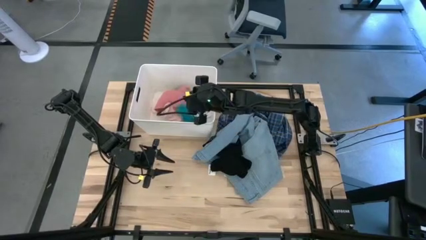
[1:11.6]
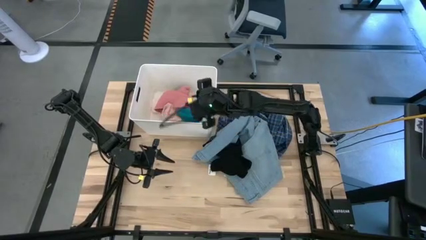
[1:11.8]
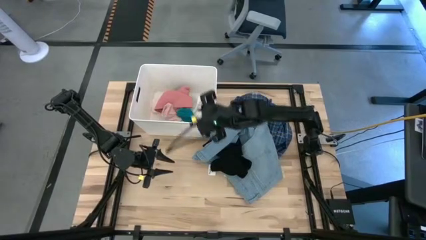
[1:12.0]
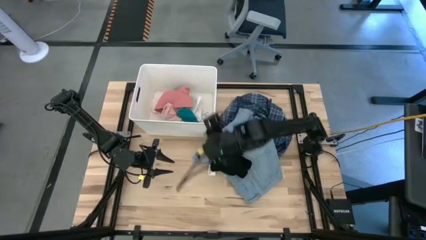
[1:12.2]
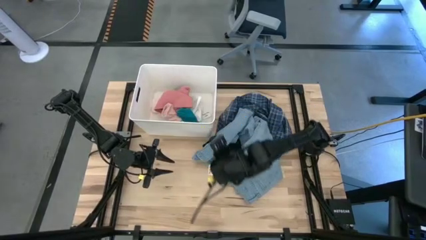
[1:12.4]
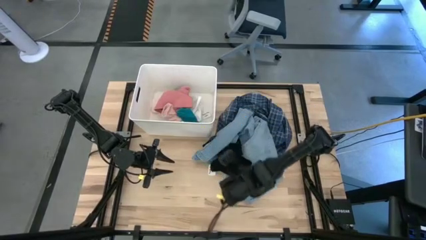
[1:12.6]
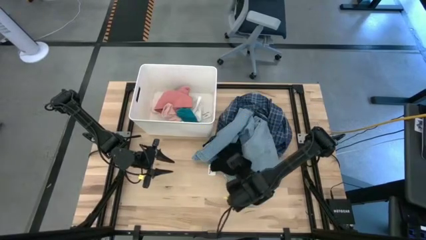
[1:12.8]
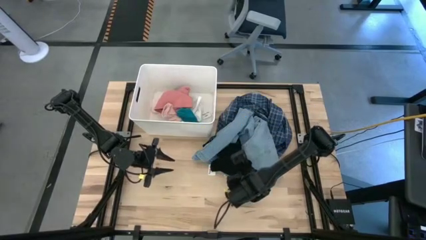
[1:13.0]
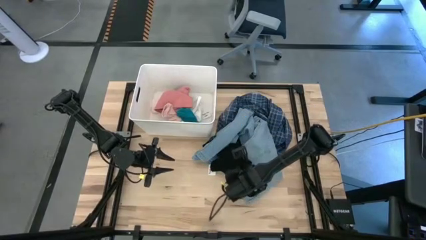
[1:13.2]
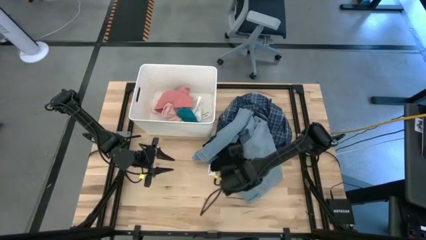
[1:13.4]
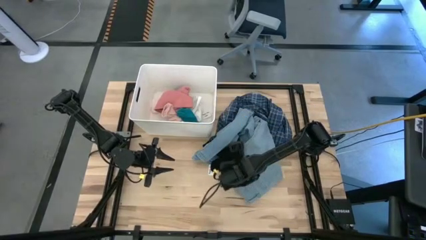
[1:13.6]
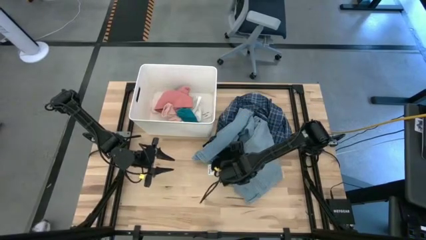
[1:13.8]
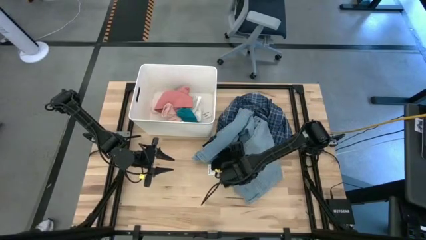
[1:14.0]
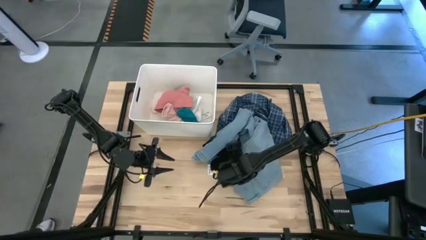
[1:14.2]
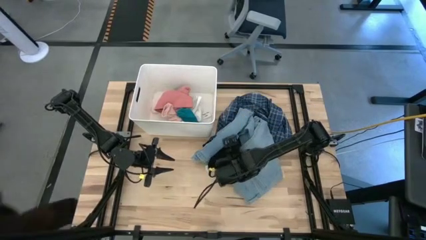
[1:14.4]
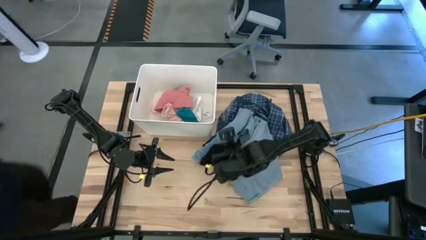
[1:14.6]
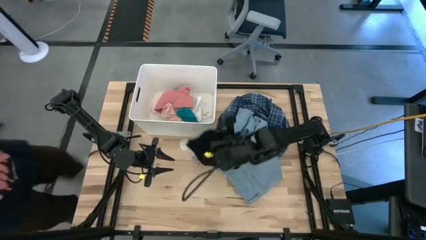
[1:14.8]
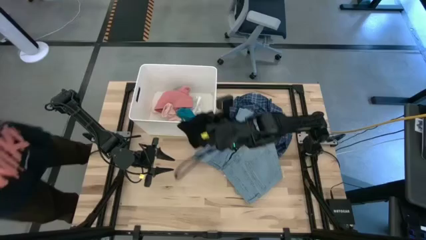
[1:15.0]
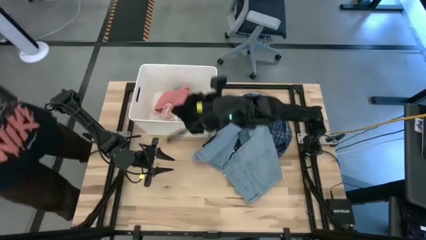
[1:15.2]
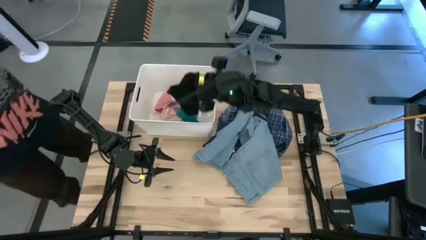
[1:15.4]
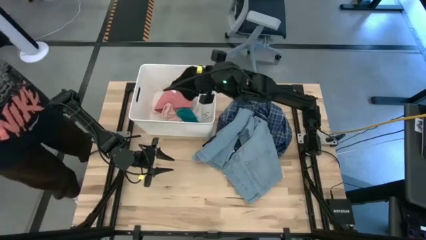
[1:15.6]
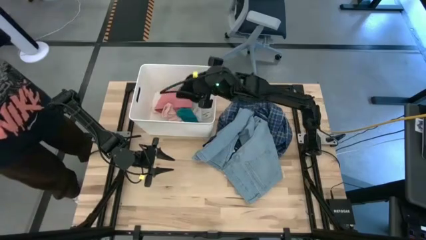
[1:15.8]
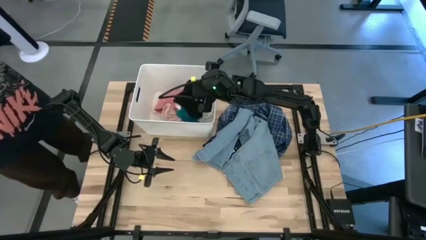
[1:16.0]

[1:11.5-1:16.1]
Task: Sort clothes
Put the black underwear into the white laundry bin

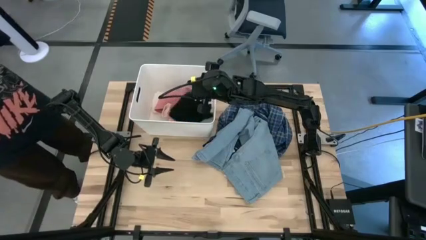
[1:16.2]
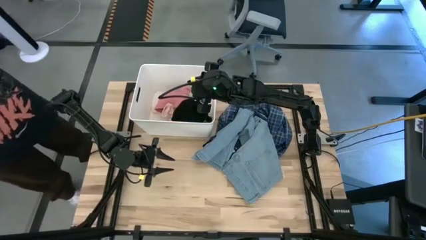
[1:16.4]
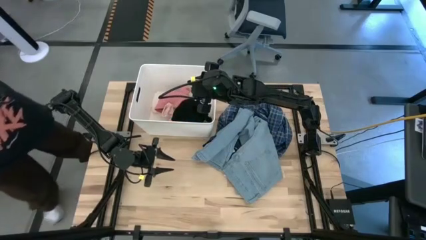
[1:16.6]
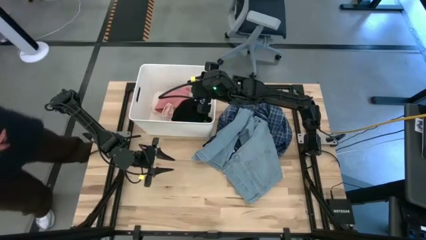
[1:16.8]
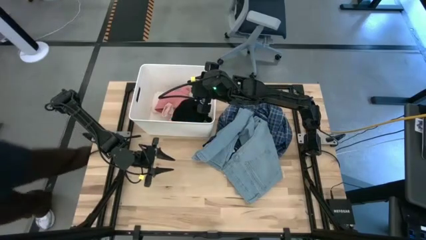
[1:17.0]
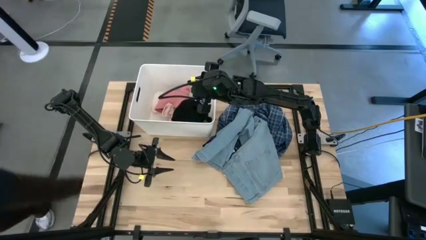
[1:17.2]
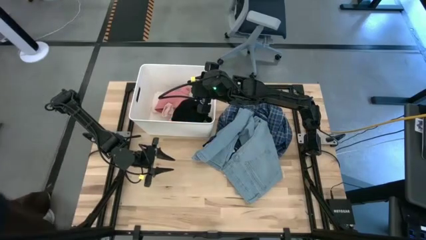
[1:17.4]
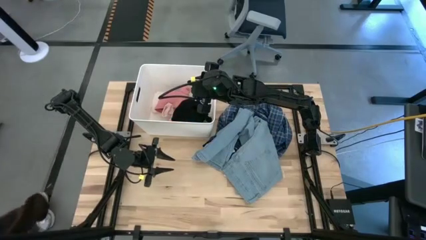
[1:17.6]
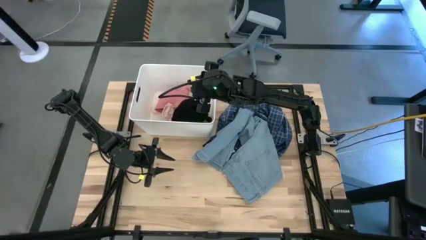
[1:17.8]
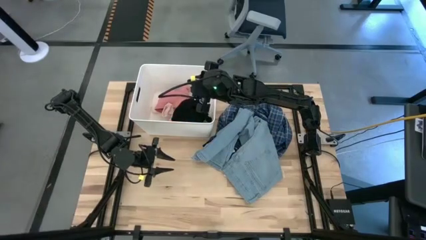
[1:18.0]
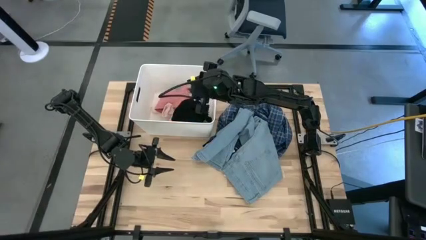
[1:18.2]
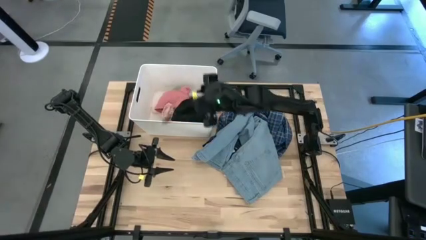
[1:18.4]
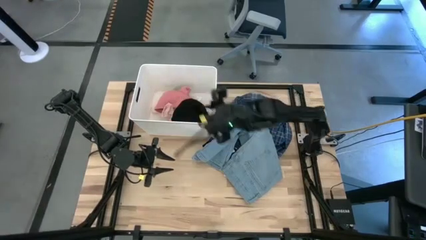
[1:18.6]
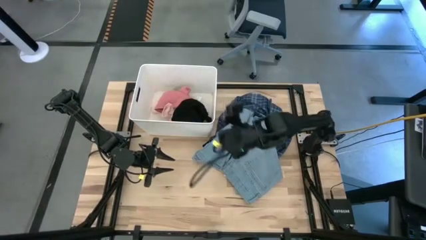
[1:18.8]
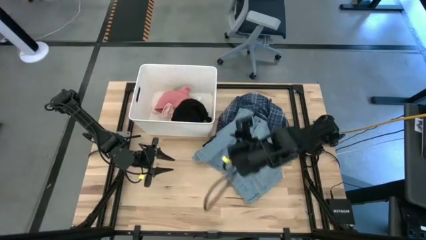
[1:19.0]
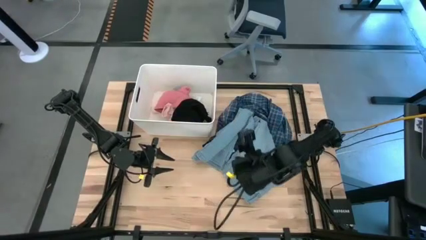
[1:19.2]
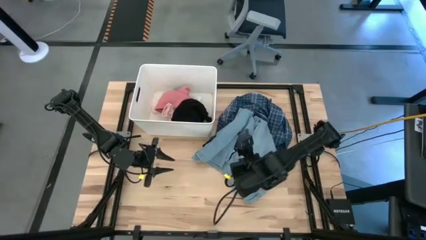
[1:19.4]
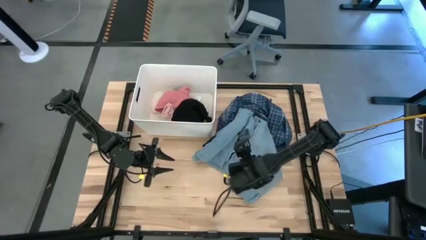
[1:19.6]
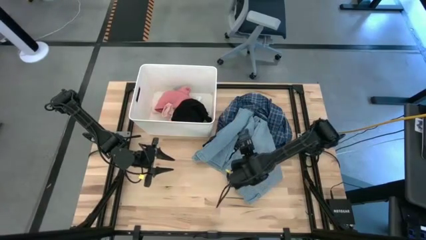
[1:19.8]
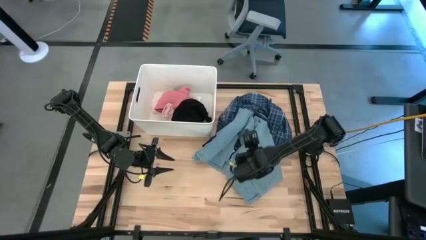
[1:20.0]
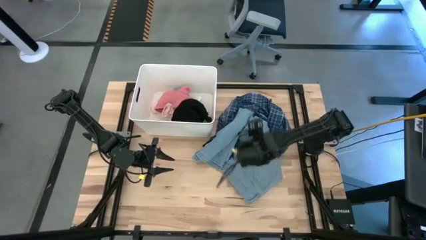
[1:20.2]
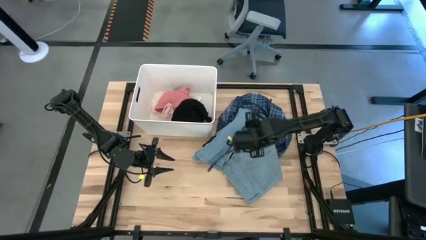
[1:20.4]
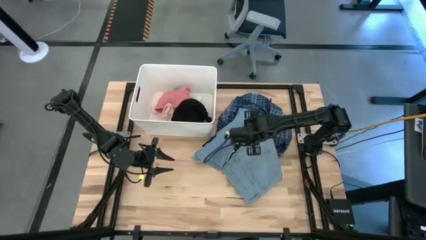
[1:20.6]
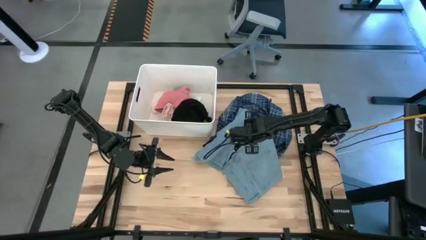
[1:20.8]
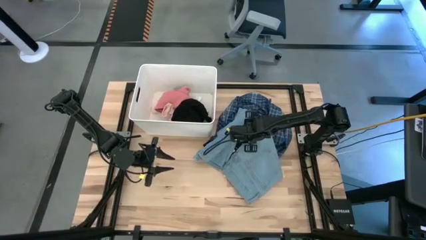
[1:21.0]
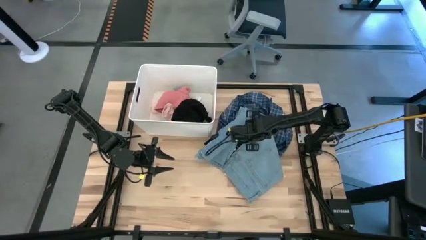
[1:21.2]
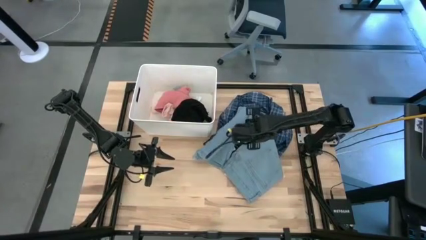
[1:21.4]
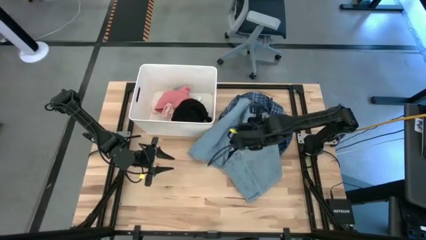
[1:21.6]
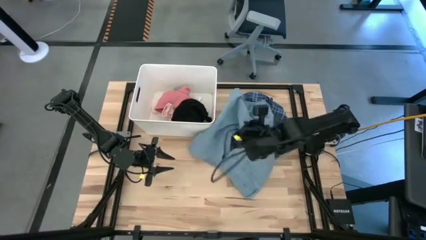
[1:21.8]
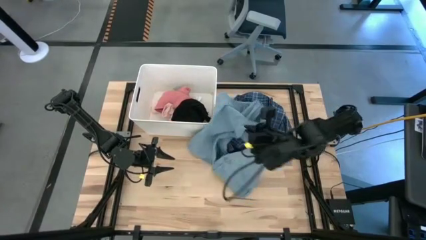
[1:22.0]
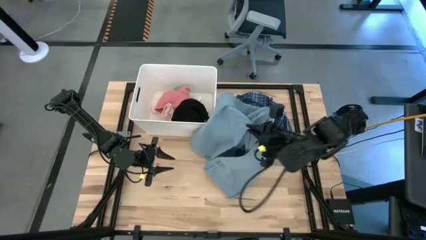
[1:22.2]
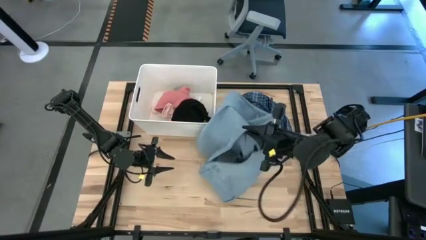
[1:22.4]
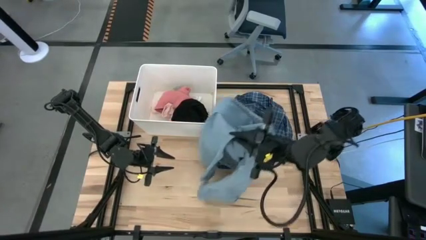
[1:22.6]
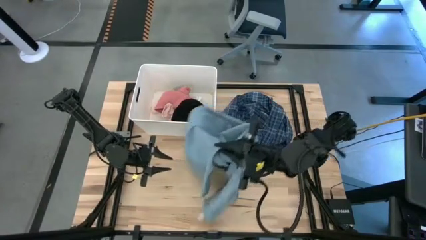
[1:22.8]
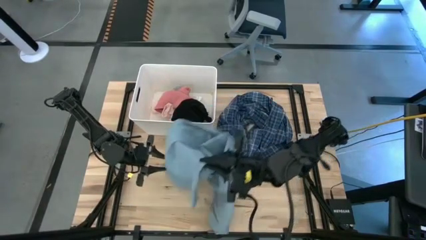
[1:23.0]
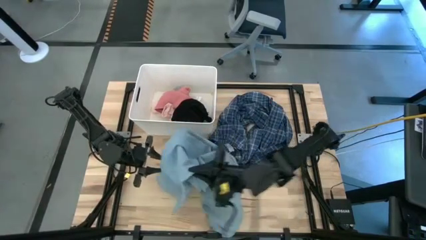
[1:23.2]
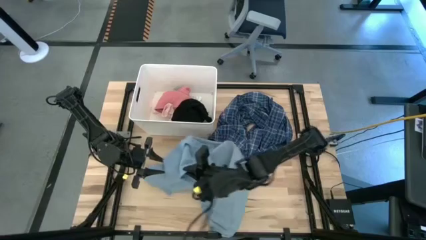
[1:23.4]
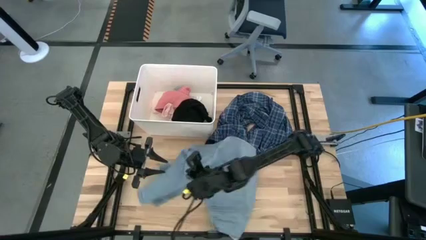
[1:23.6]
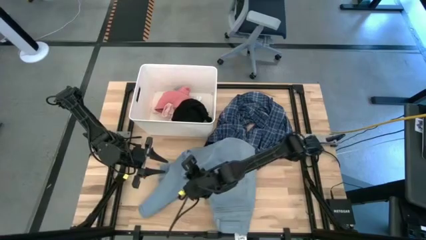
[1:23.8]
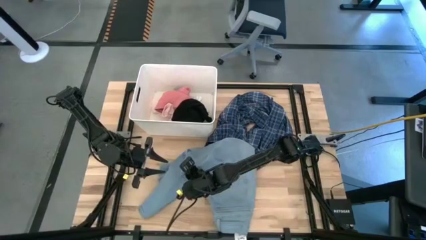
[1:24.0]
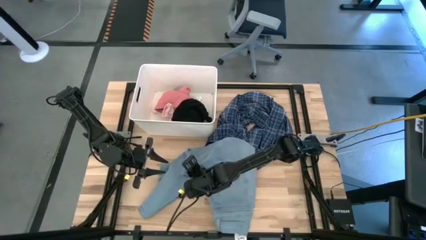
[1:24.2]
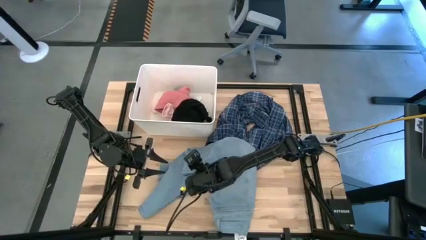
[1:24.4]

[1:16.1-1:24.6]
Move the blue jeans to the center of the table

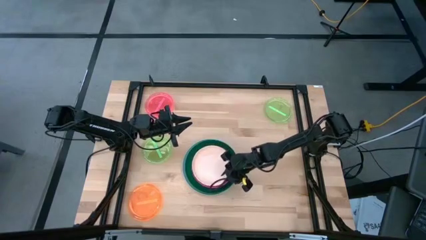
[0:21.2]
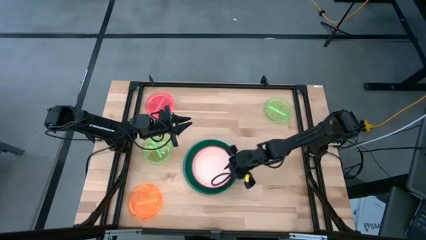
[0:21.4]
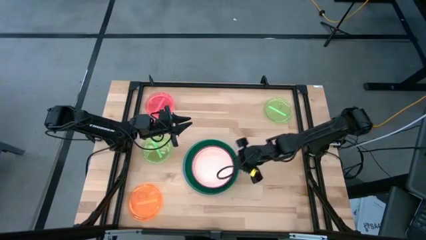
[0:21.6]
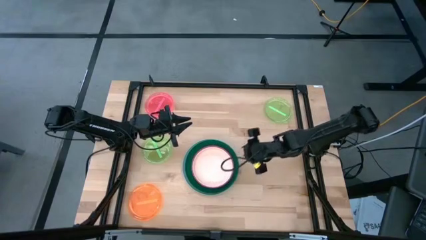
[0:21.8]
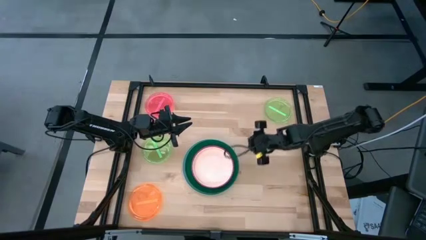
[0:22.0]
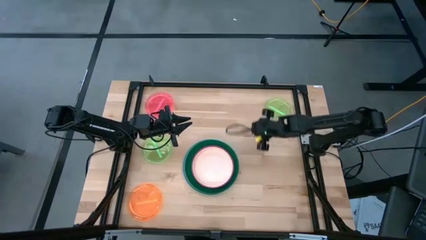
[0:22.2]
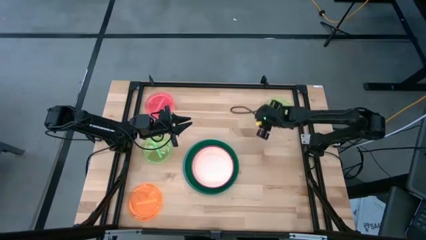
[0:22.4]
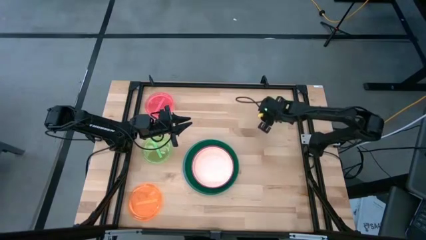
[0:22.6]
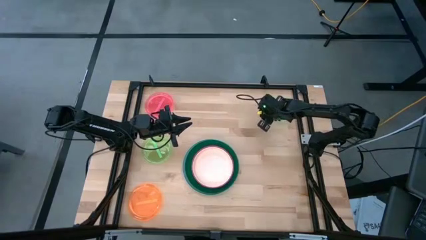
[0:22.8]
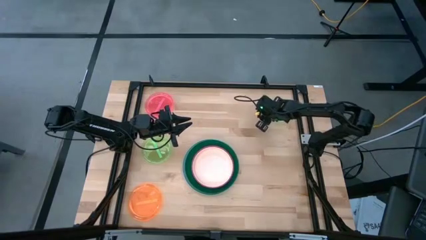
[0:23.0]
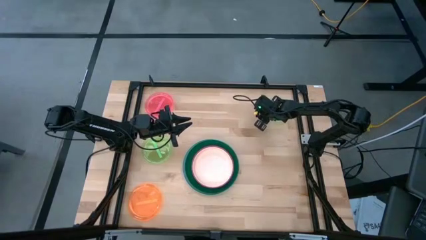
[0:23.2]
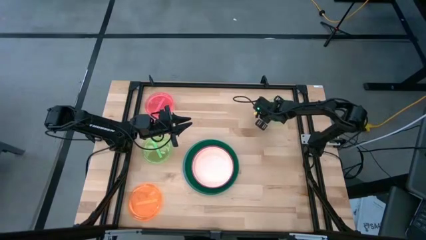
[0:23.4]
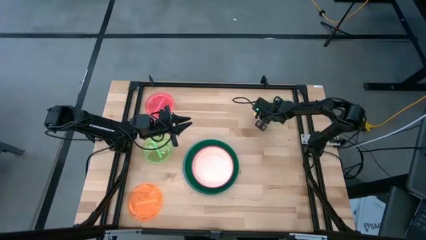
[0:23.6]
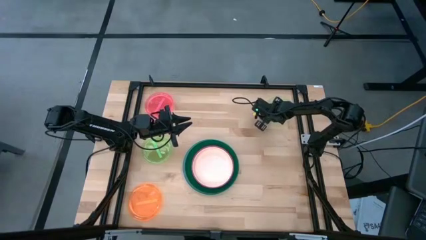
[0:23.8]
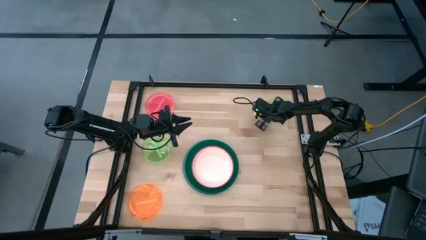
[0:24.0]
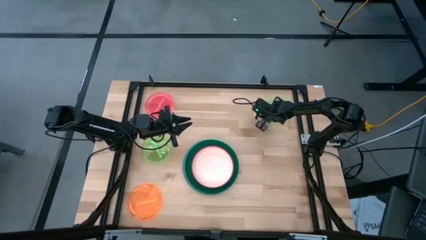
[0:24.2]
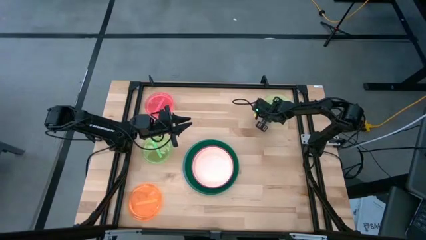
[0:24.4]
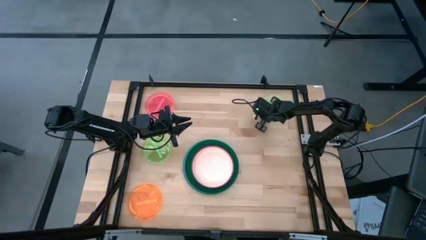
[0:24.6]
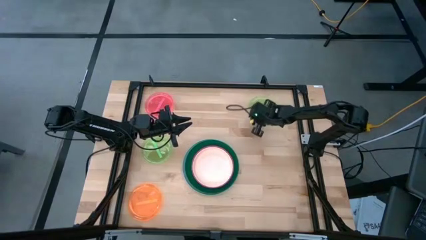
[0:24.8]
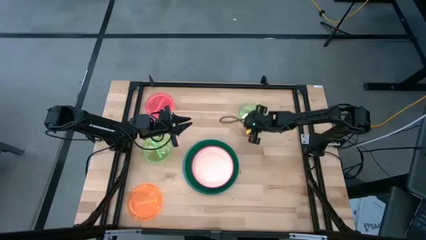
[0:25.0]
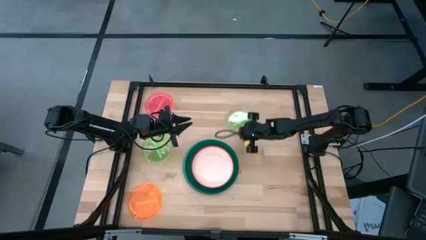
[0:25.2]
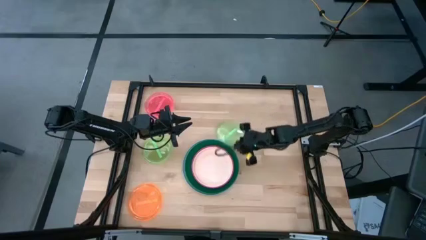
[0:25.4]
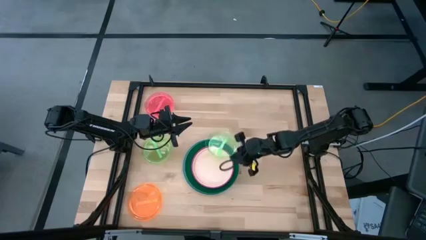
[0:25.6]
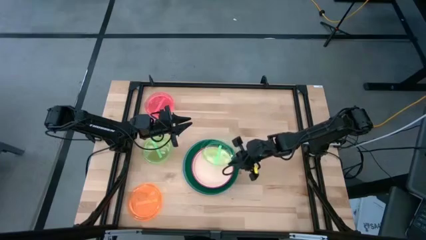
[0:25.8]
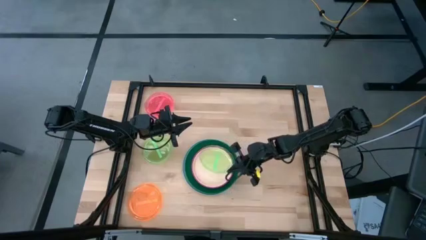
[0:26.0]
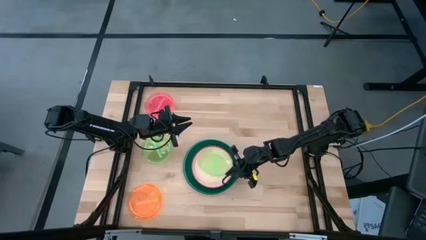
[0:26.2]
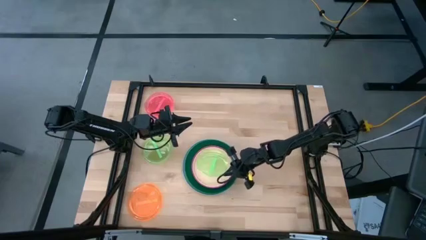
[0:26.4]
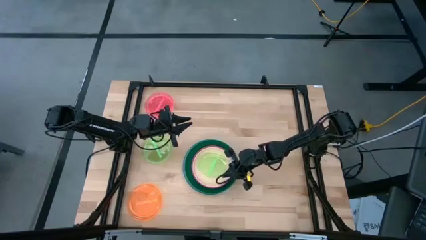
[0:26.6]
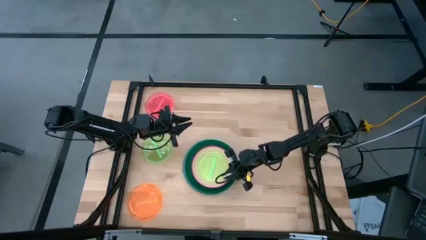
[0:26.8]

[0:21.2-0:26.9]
Task: Stack plastic plates
Stack the top green plate on top of the white plate
